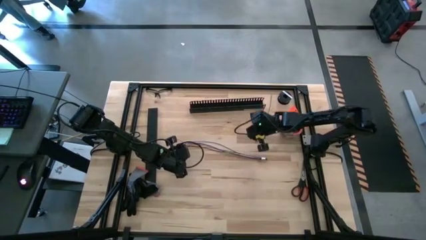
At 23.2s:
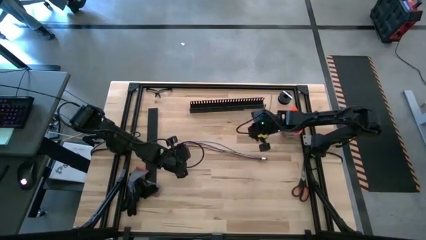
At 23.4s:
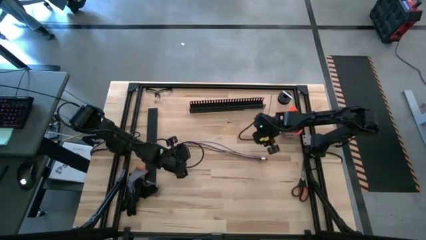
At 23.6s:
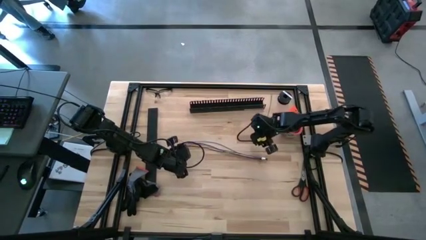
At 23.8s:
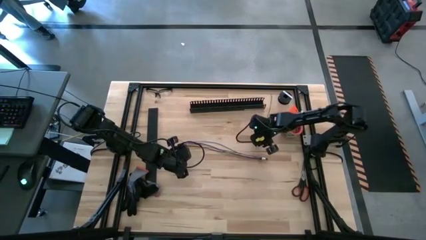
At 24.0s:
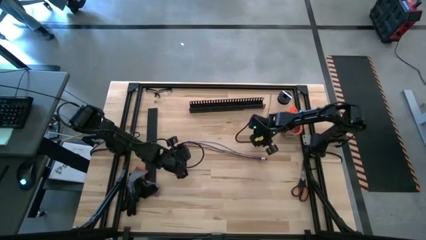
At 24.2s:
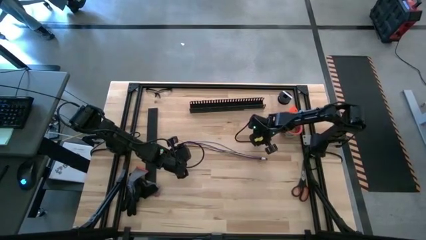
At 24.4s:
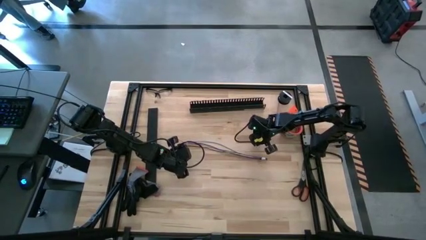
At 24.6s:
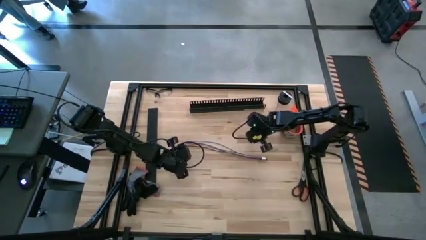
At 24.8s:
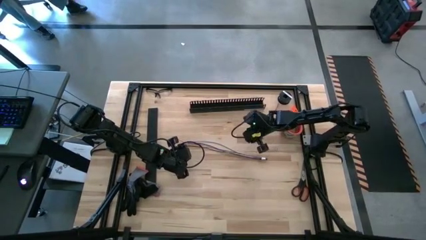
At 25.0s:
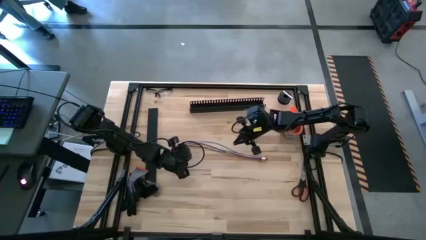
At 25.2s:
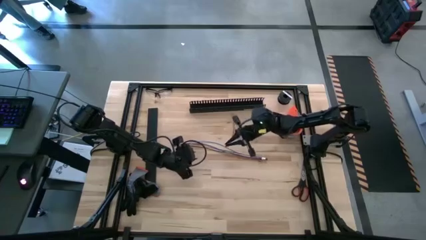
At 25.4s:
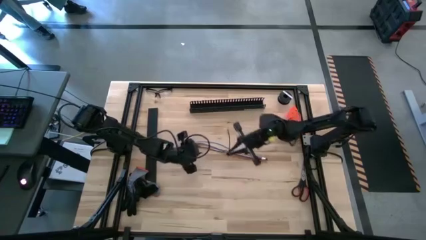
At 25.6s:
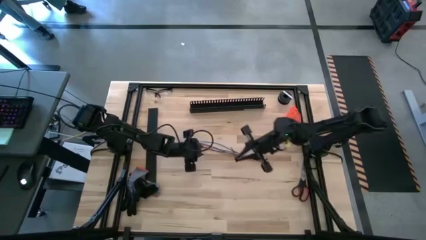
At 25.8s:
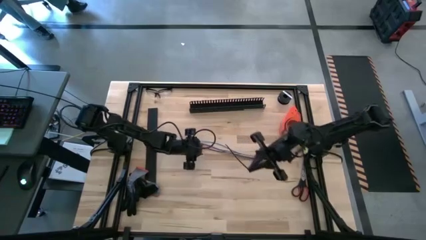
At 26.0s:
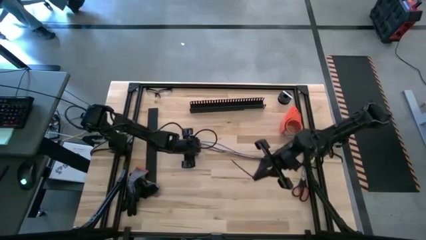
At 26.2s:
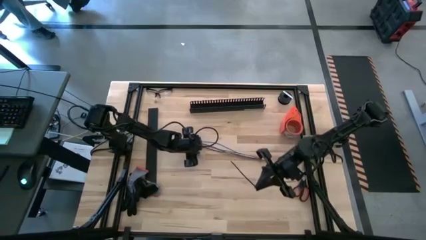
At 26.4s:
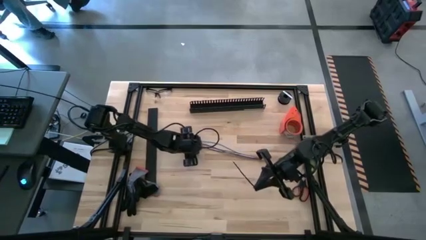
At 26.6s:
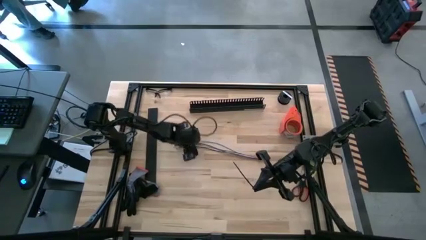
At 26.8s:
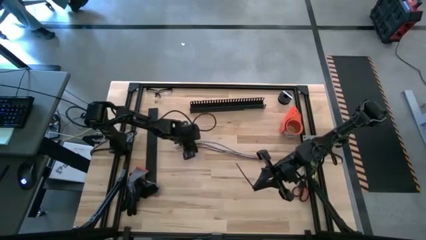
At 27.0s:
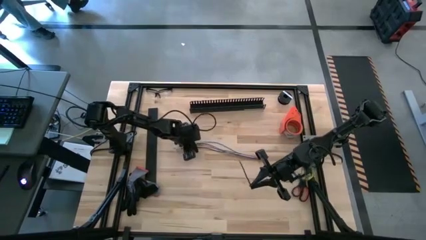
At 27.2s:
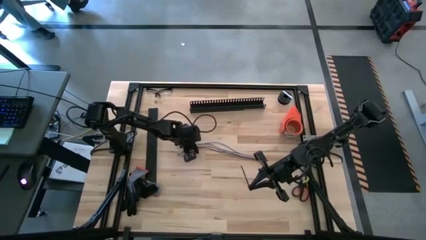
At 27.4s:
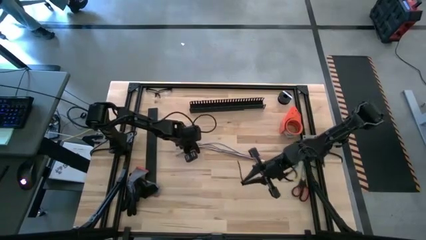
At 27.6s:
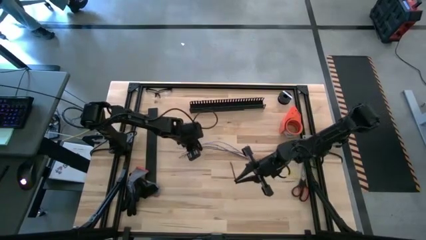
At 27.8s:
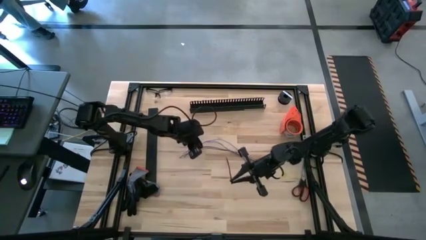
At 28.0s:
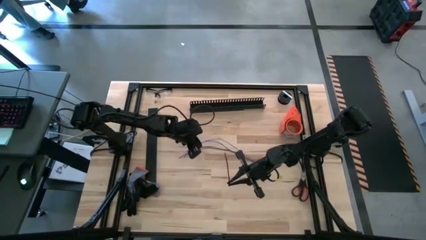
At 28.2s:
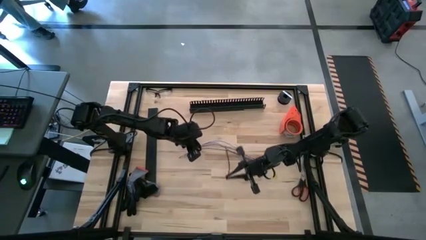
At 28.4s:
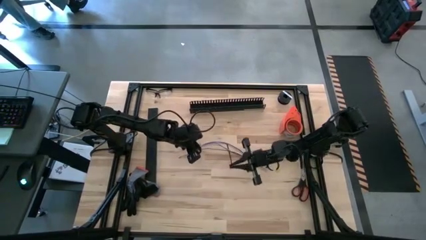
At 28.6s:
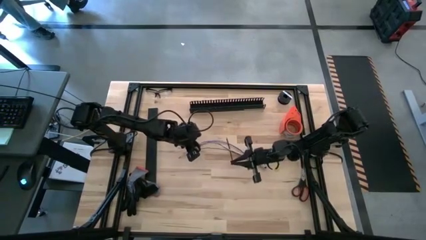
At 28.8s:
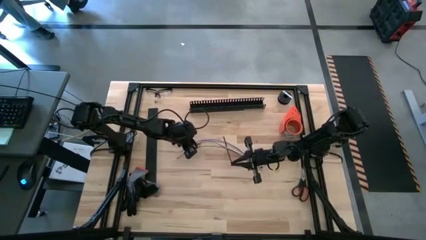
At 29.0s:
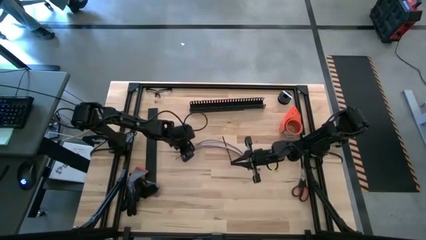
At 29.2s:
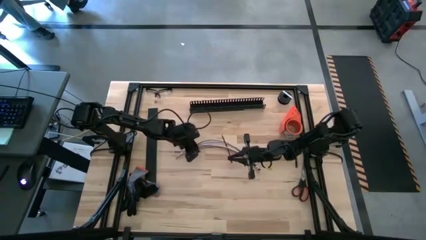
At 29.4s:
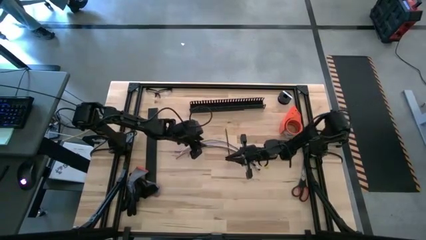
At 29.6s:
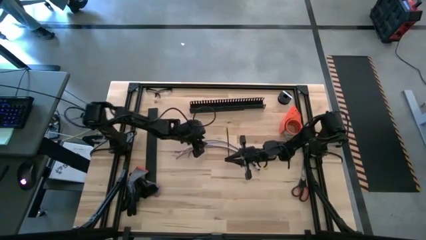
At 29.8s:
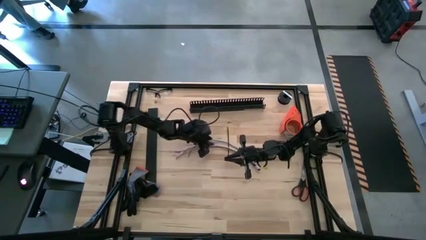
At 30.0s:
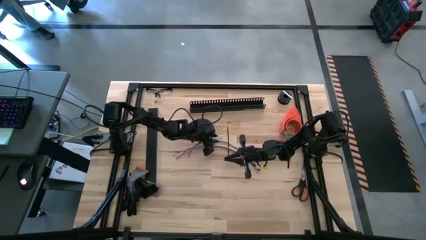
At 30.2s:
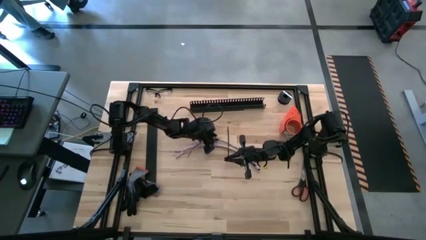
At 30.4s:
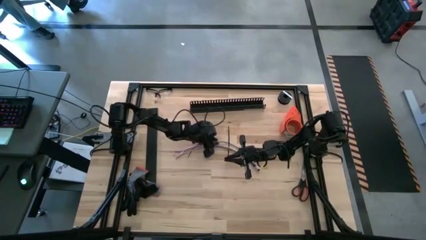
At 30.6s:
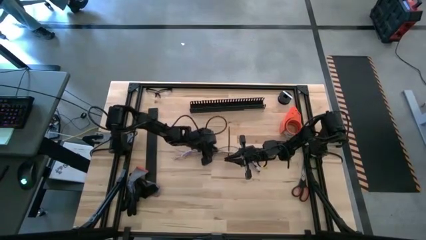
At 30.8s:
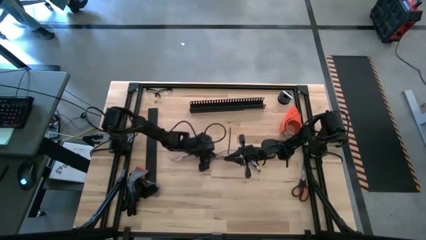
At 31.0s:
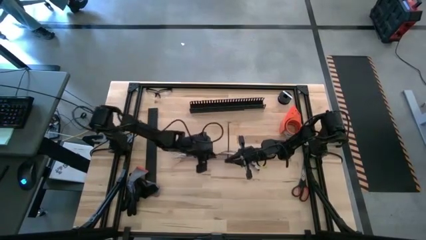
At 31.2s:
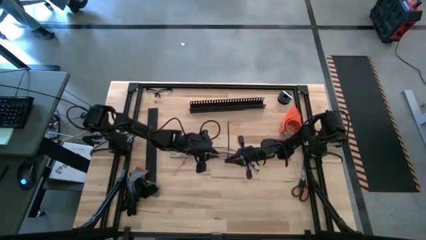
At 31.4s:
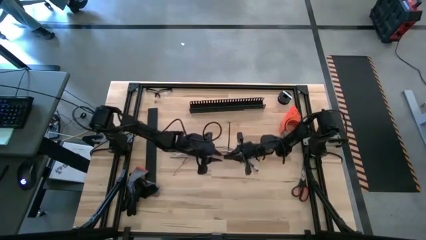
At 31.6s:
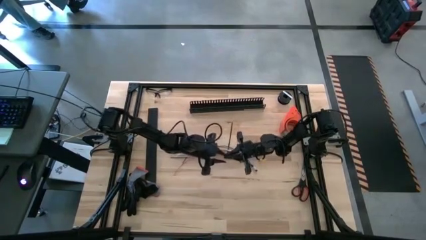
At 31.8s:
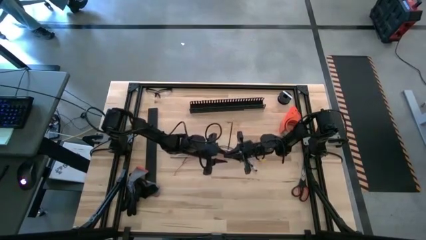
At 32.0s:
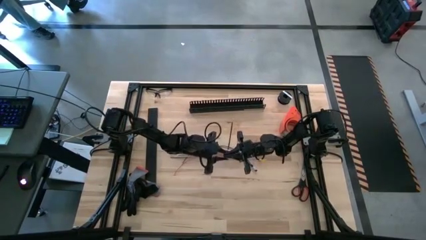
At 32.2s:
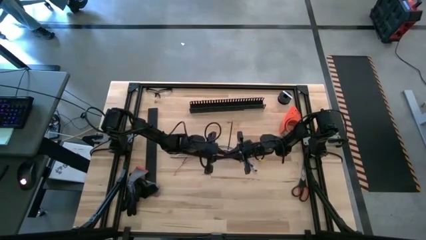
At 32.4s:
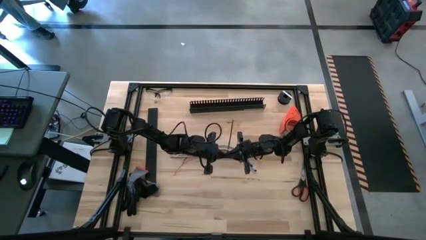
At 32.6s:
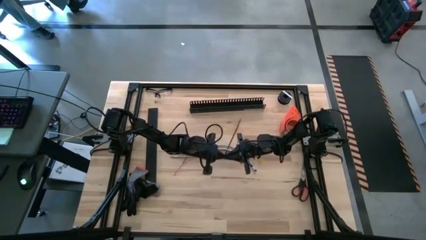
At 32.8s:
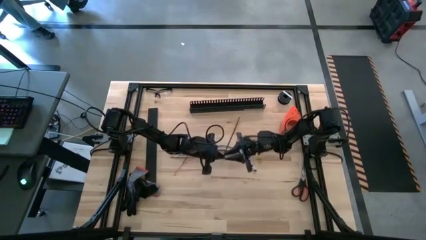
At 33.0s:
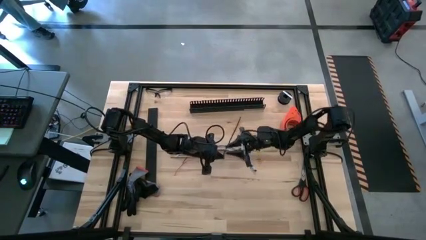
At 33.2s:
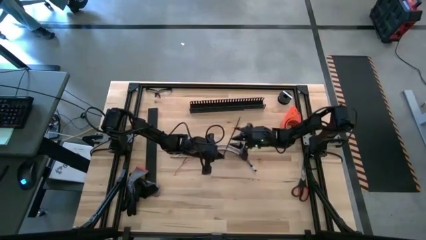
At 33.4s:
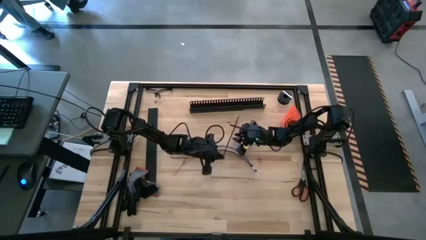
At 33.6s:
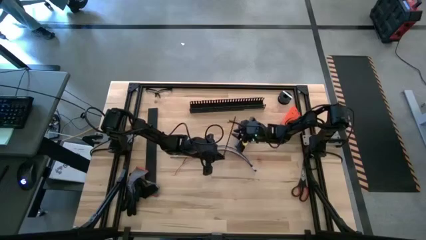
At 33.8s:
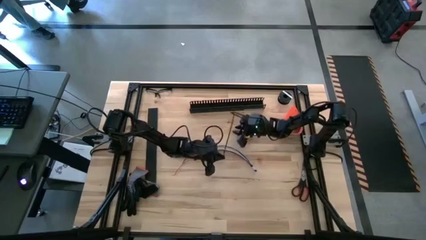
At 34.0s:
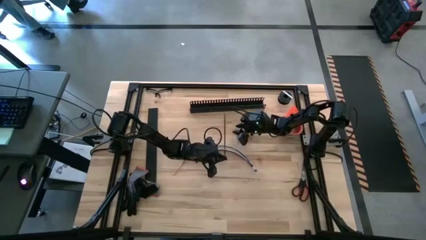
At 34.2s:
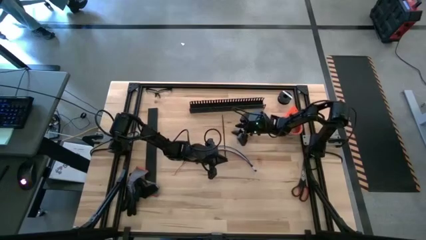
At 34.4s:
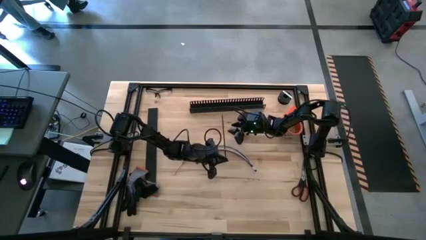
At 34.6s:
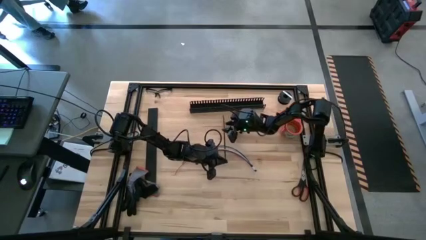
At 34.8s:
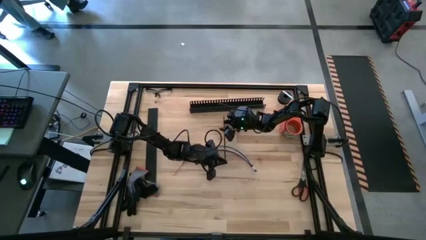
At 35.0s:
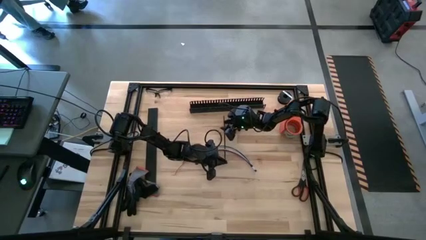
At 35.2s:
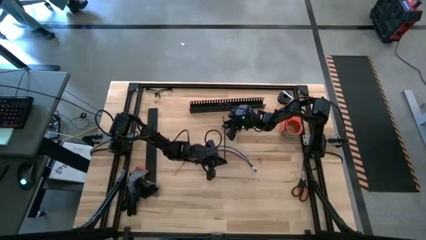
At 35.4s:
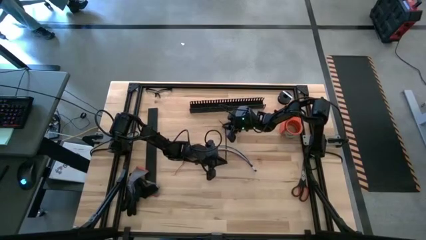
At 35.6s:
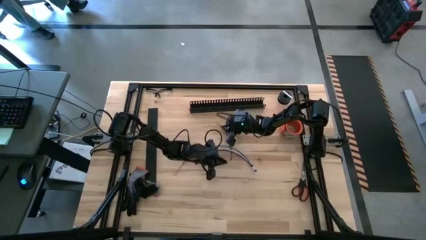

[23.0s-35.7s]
Task: Ziptie cables
Wrap the cable wires with a black zip tie

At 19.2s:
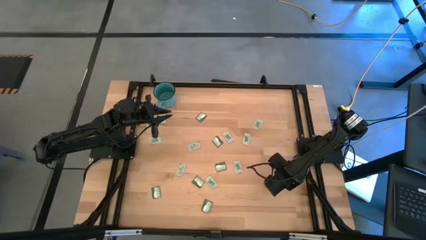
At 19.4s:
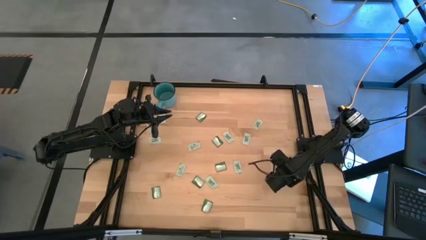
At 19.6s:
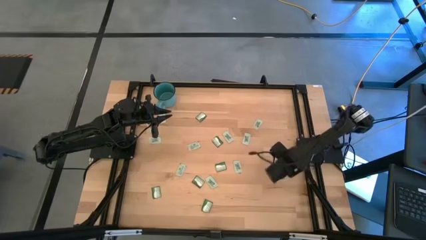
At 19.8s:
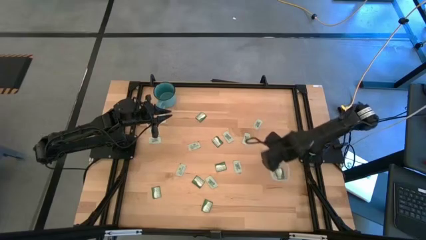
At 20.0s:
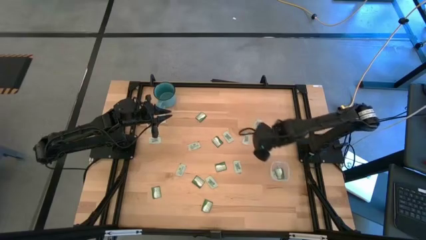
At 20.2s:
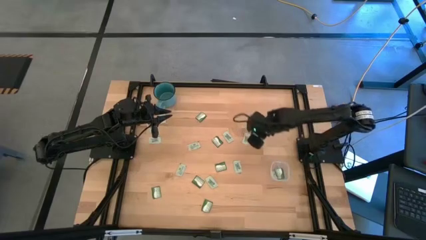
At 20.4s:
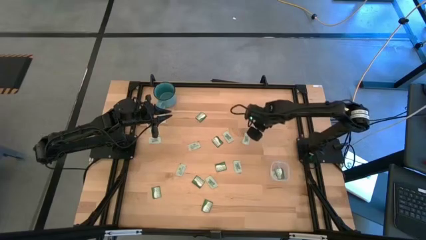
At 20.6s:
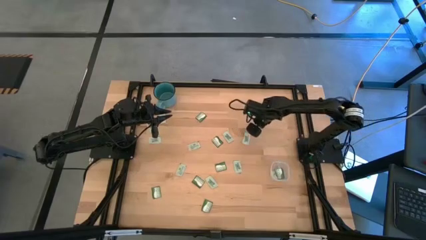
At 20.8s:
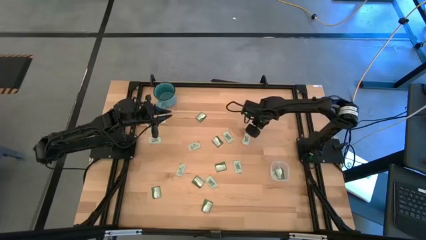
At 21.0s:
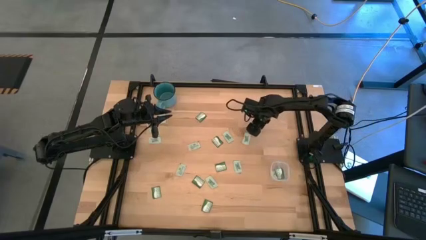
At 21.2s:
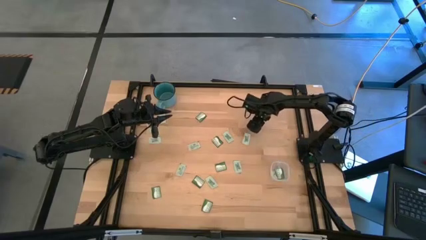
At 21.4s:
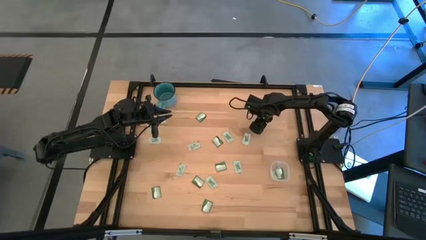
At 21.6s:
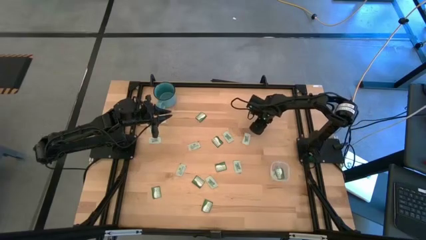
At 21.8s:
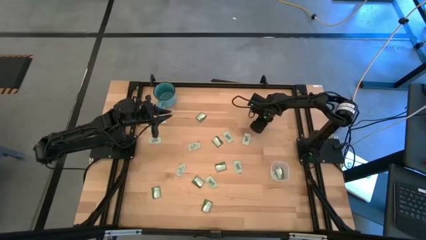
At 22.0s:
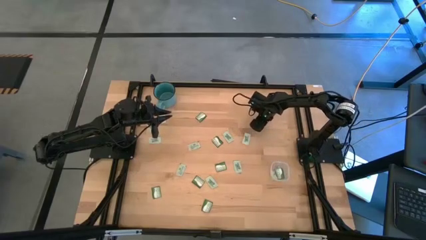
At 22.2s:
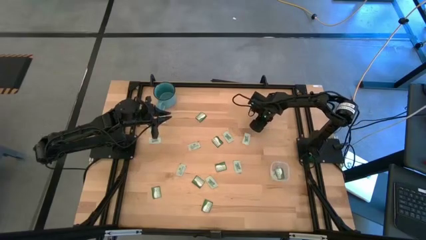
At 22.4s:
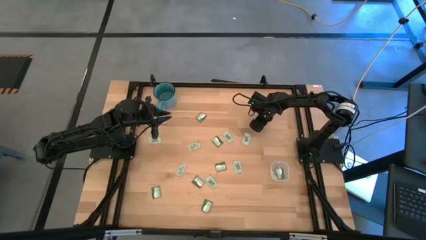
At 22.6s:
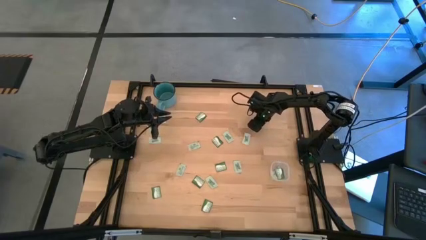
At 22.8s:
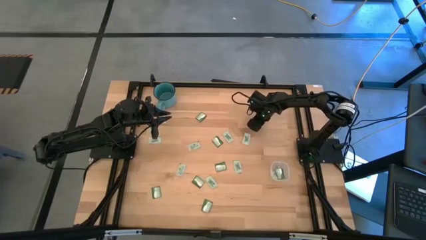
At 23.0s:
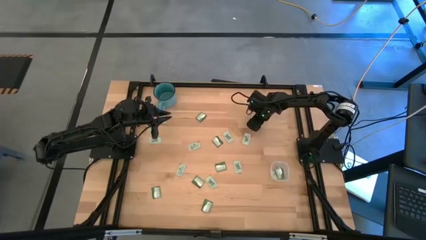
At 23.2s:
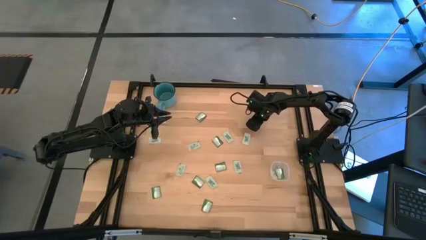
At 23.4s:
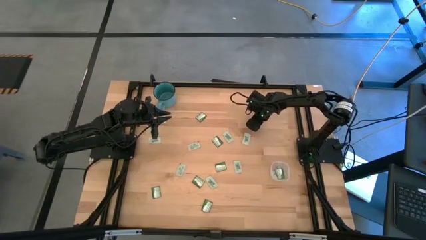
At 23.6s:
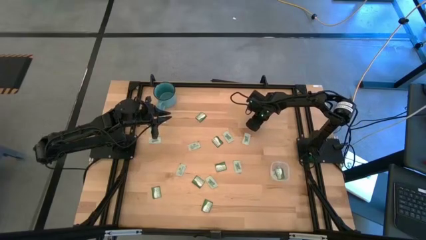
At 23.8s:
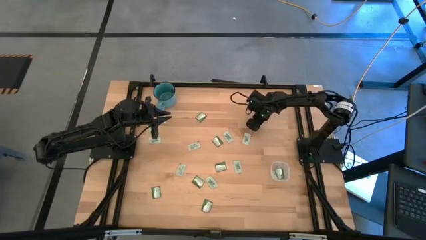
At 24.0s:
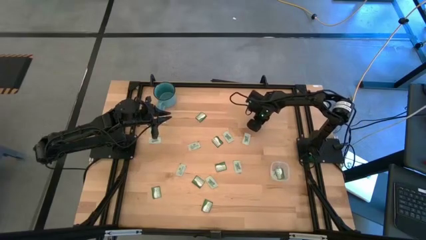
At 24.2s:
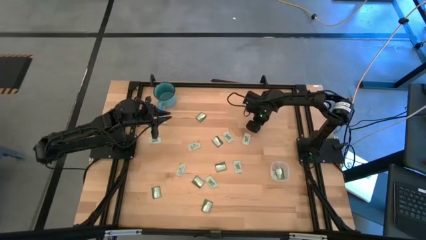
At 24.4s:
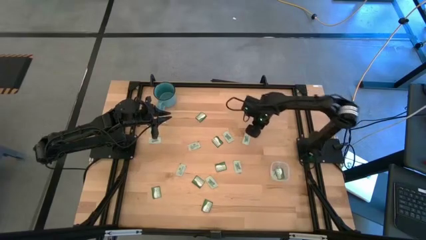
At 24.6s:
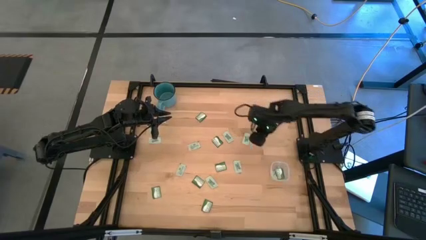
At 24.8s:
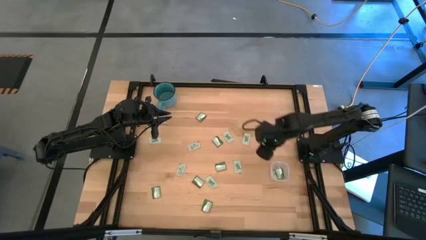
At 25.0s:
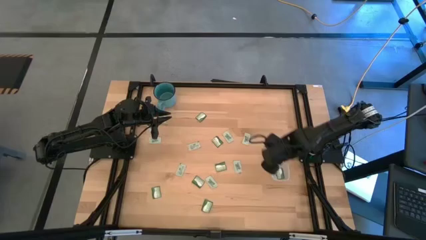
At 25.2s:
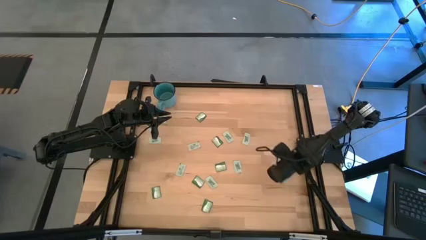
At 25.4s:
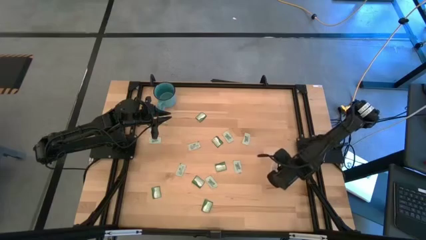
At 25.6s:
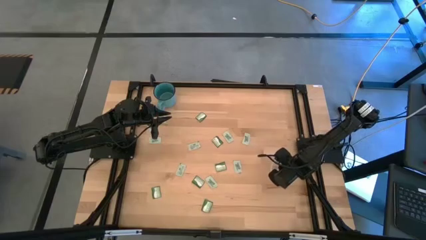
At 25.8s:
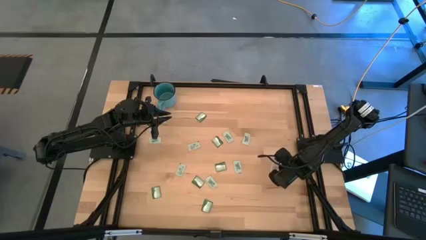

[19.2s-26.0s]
Task: Pick and place items into bin
Put the white stevia packet into the transparent bin
